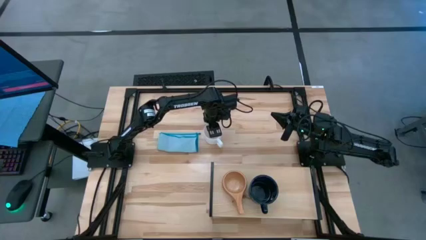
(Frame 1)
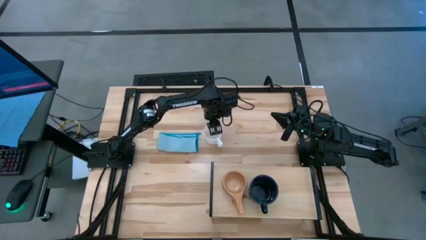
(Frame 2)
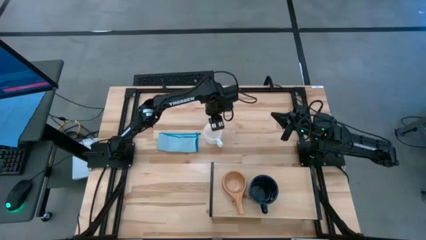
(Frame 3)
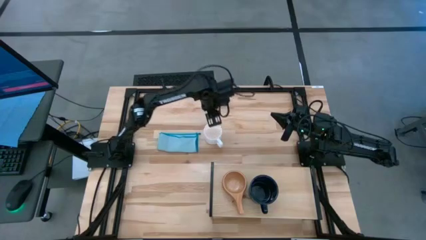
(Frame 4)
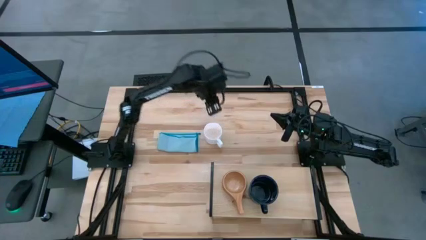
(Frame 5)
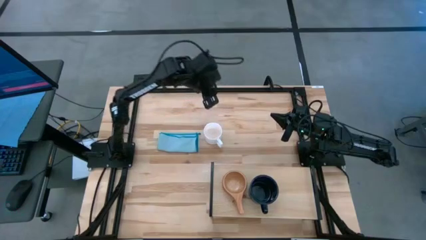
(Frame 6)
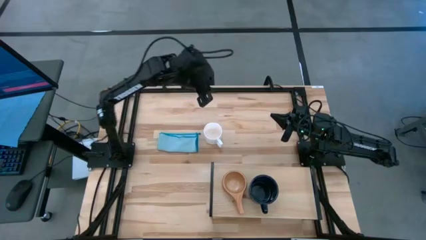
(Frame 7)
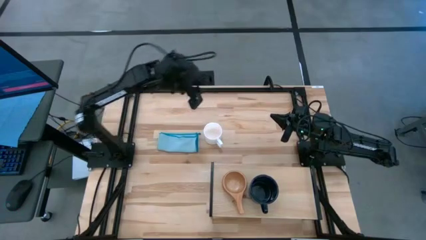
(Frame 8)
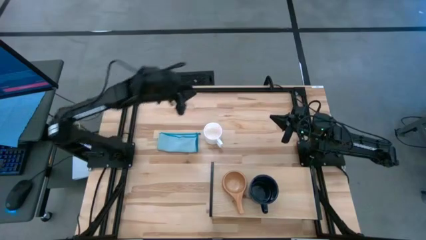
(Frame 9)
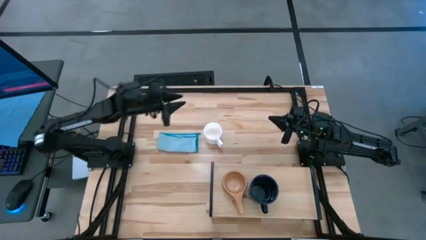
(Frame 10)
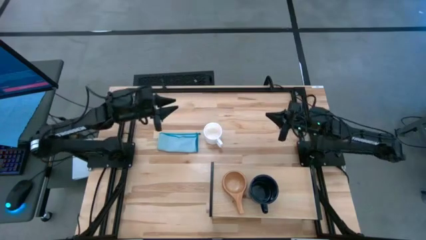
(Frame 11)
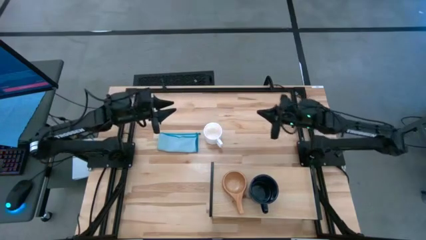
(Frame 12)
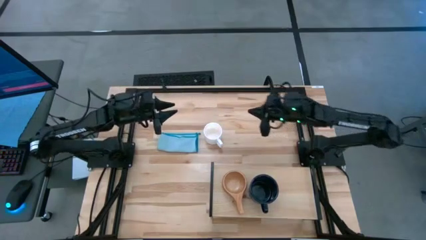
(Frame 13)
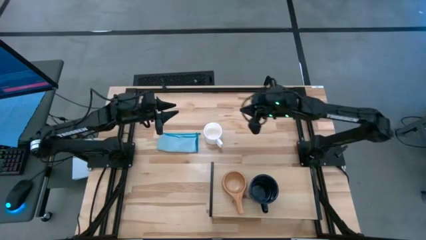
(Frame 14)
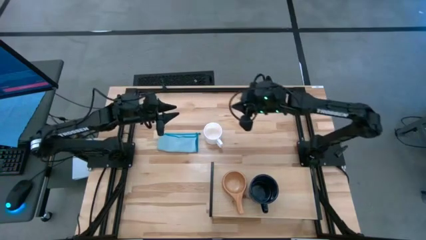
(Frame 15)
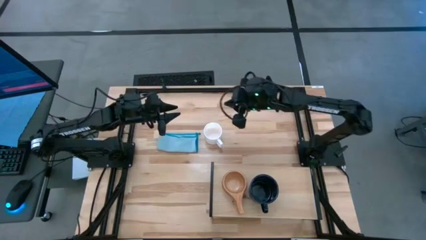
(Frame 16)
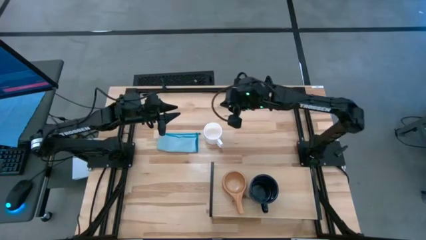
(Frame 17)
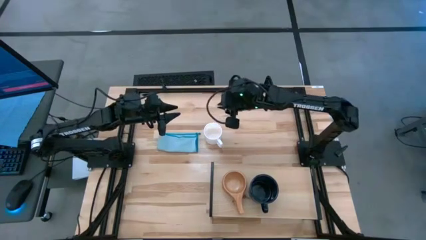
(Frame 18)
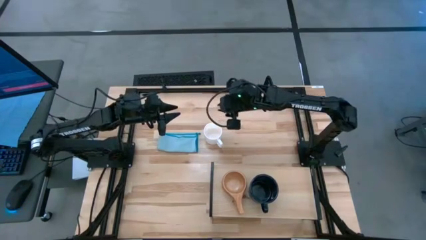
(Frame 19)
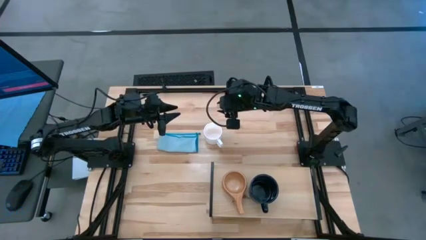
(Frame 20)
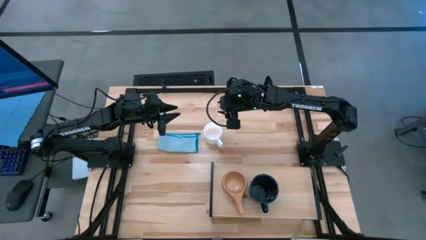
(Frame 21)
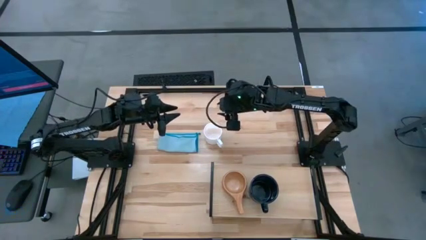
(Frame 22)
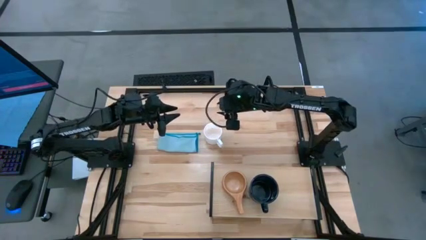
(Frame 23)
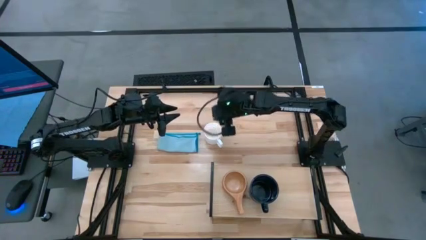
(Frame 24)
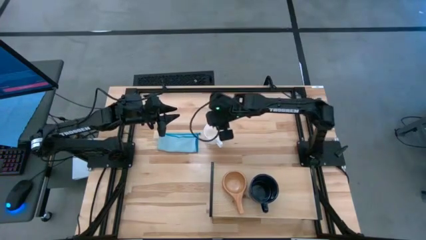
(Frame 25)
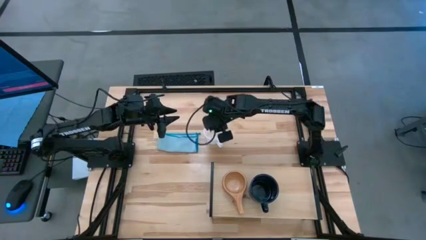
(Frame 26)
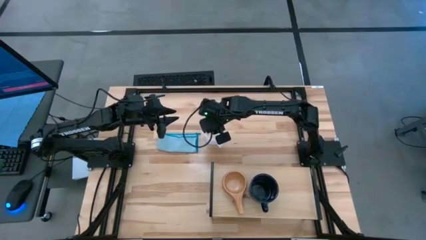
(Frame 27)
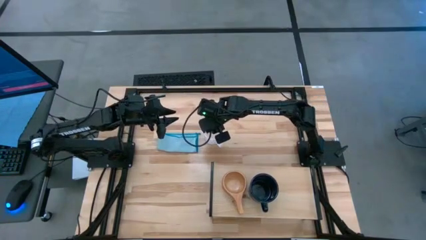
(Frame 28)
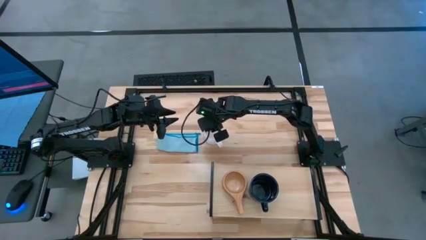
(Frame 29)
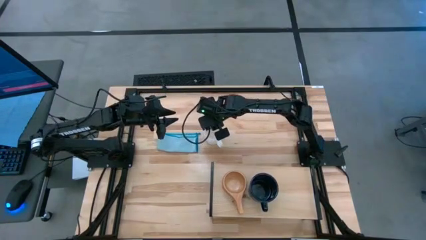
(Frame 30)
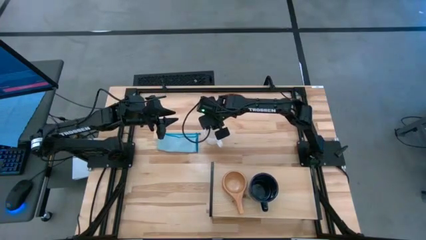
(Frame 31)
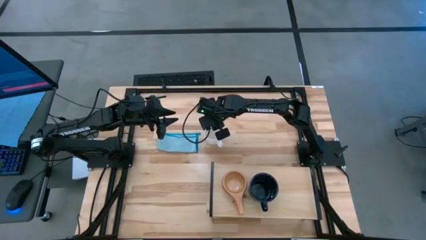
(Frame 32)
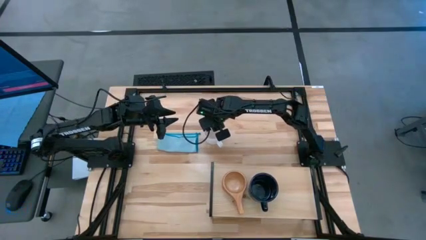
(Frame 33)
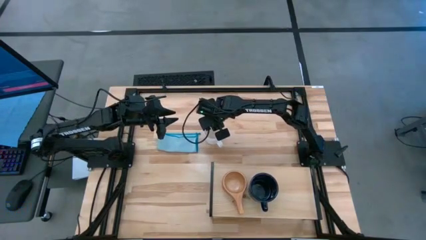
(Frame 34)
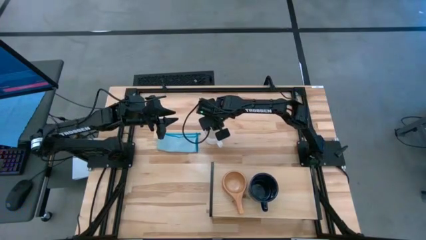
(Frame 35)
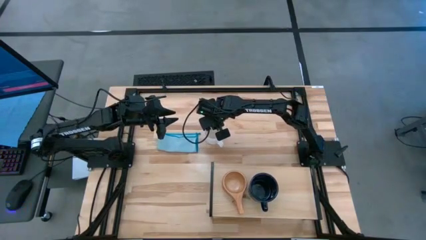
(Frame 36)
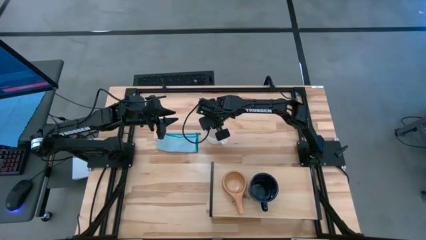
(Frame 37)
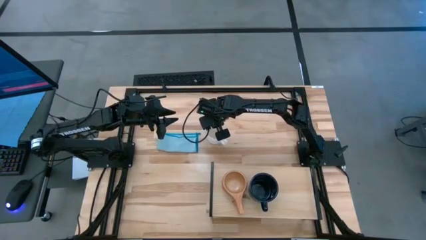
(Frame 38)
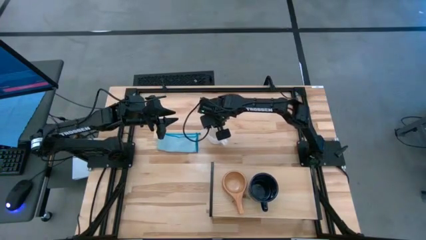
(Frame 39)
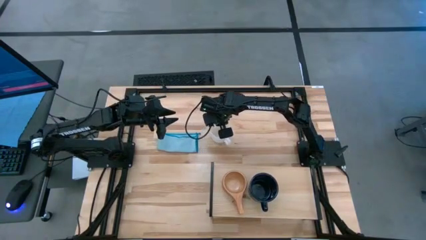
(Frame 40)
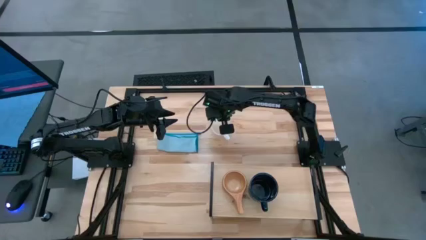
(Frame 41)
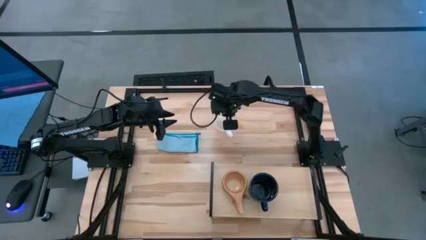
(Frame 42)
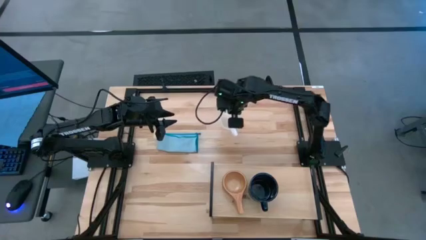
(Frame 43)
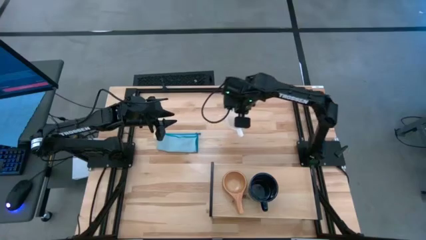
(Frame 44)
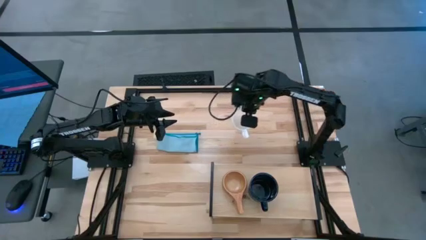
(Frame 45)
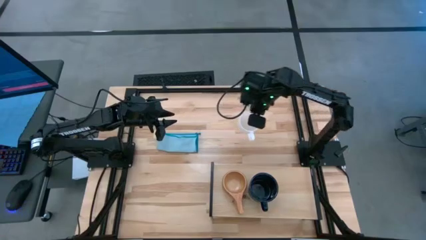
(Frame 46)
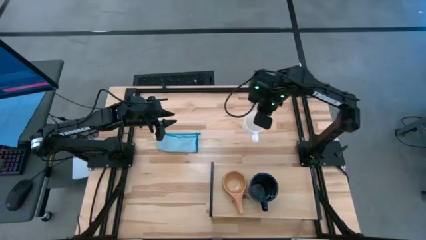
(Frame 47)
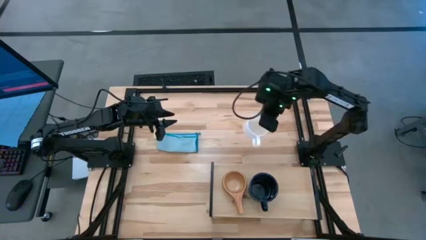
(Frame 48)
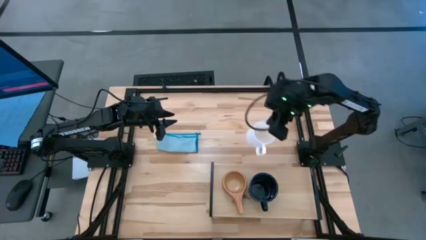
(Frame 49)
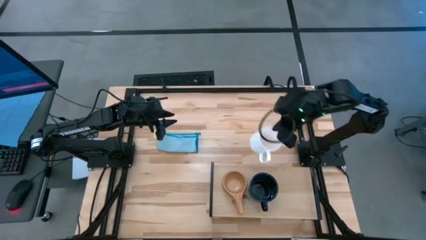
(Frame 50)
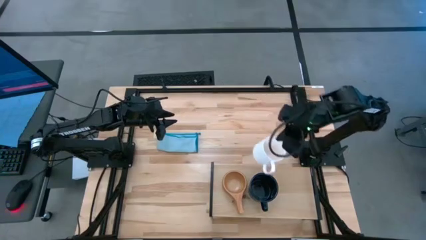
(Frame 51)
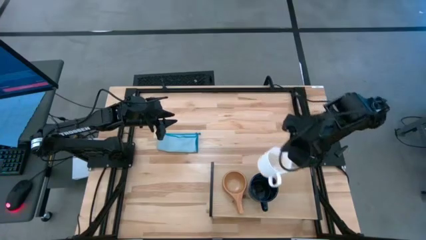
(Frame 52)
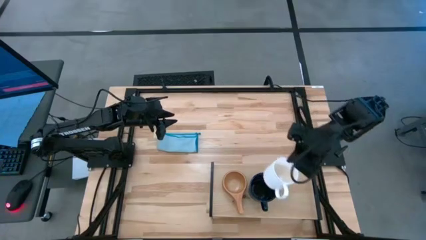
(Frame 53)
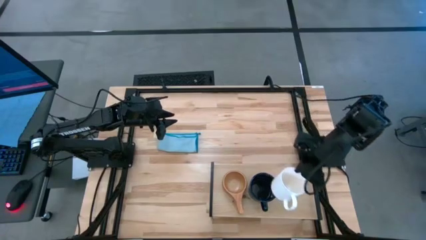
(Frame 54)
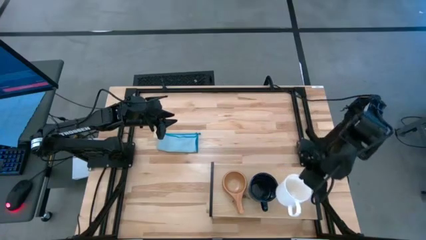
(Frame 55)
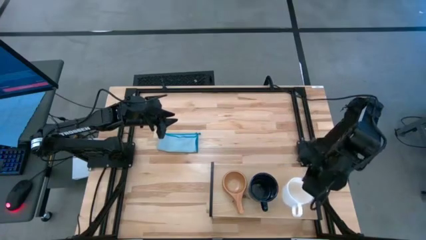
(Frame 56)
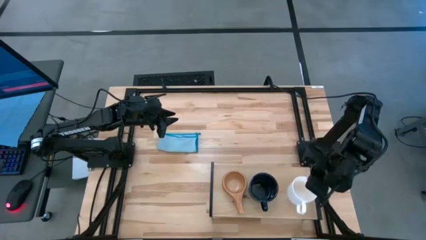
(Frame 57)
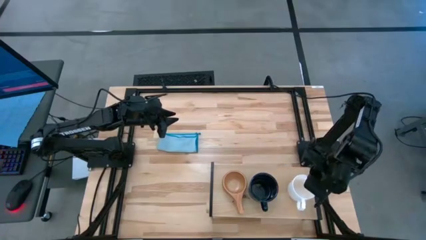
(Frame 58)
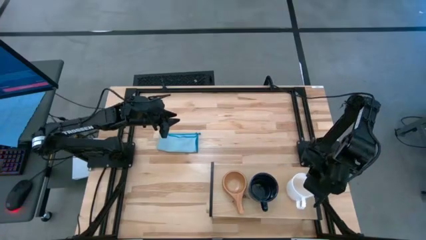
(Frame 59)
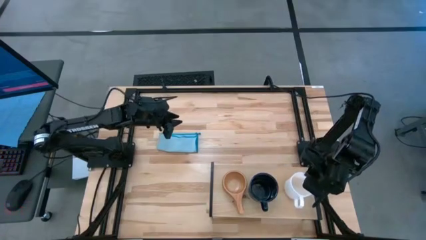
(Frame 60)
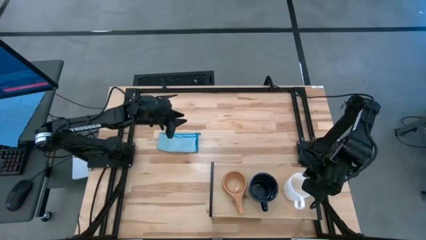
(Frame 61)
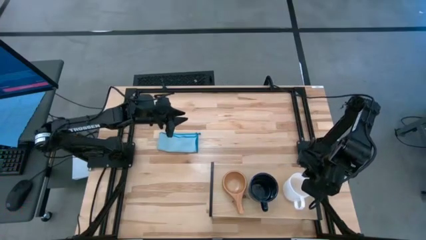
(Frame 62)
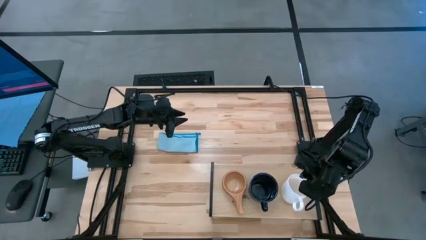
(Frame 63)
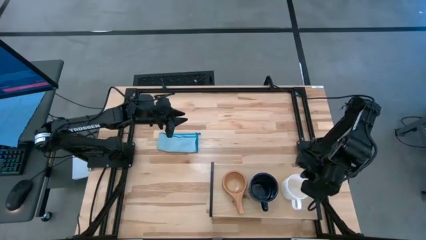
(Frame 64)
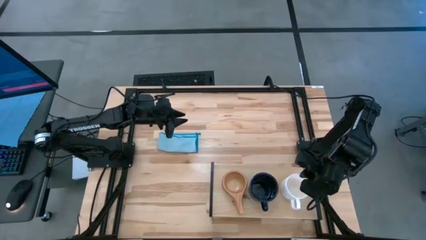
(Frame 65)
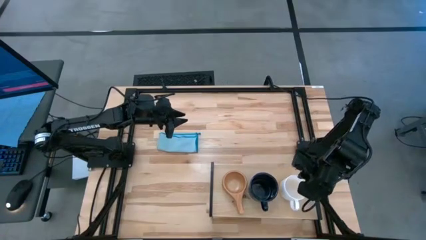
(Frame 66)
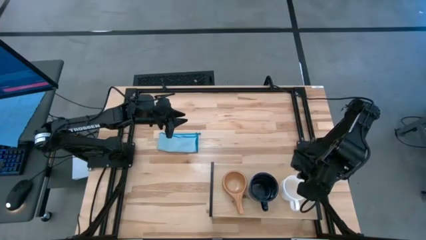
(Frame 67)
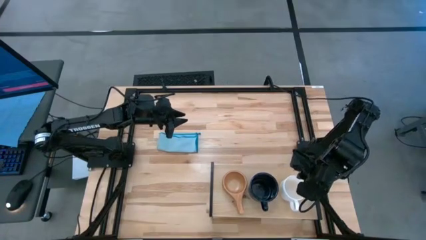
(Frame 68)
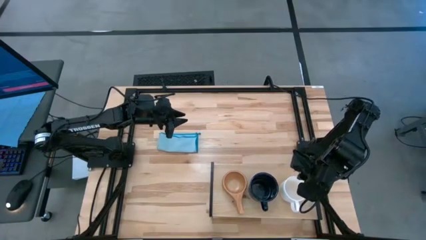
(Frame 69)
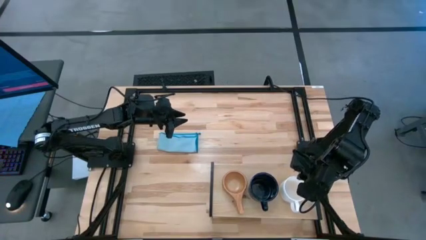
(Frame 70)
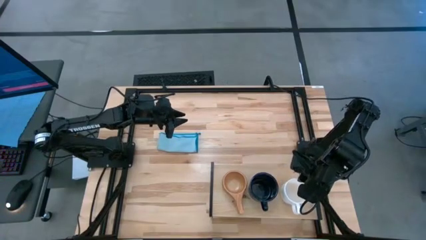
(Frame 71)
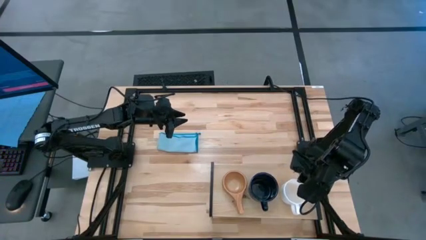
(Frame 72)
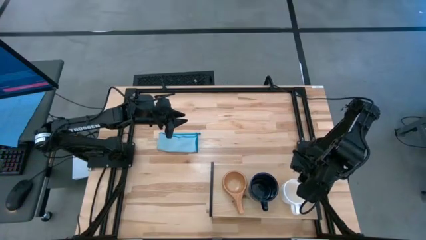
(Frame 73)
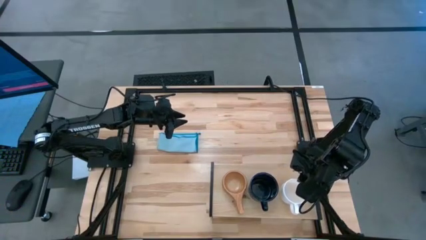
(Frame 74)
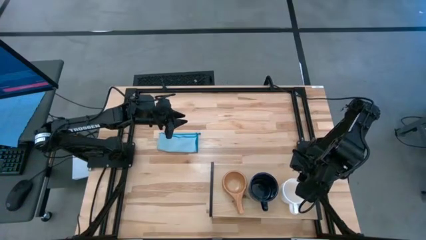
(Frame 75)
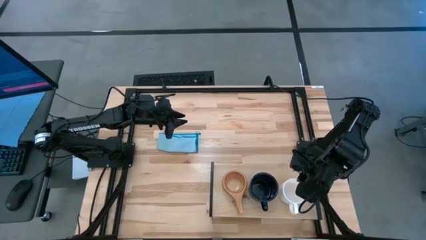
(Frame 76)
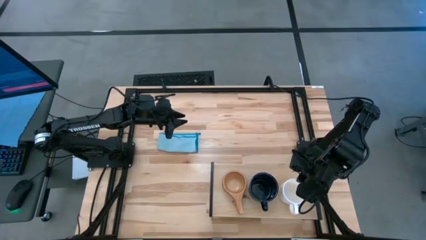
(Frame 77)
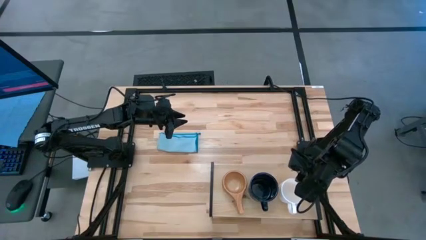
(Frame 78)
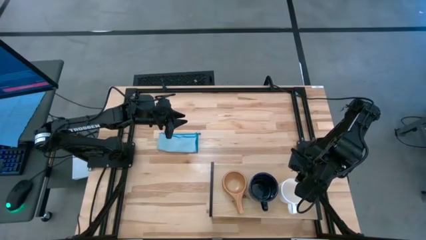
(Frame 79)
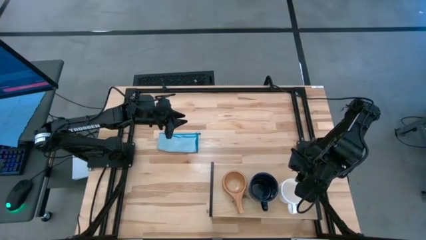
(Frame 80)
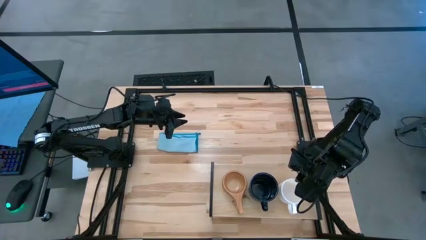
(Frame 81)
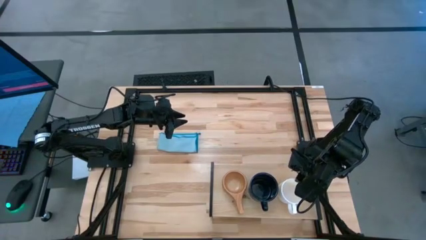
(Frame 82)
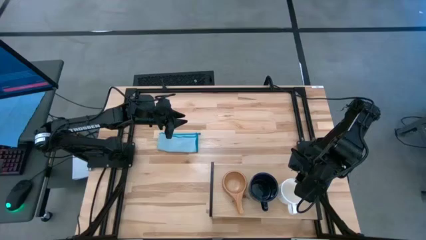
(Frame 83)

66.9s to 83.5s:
Task: Stack small to large cups/mugs on shelf
Put the white mug on the shelf
